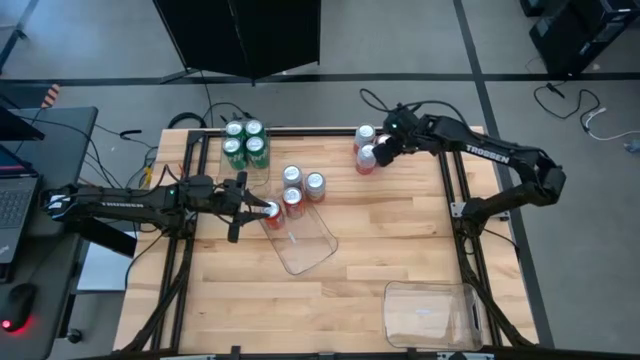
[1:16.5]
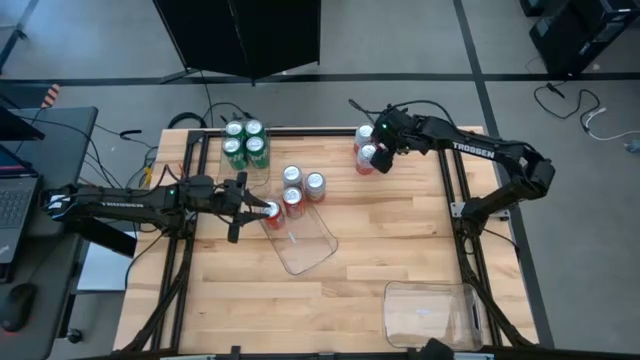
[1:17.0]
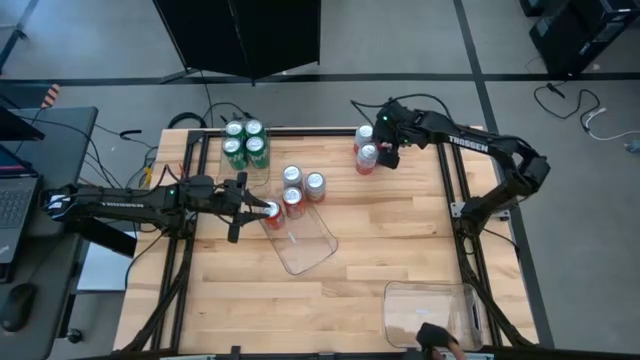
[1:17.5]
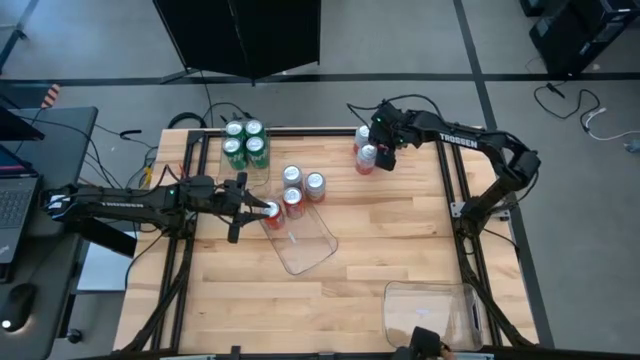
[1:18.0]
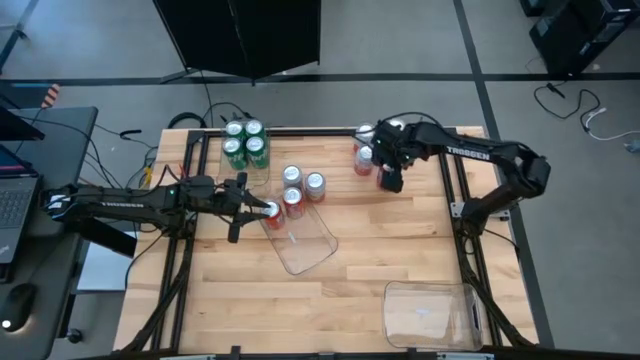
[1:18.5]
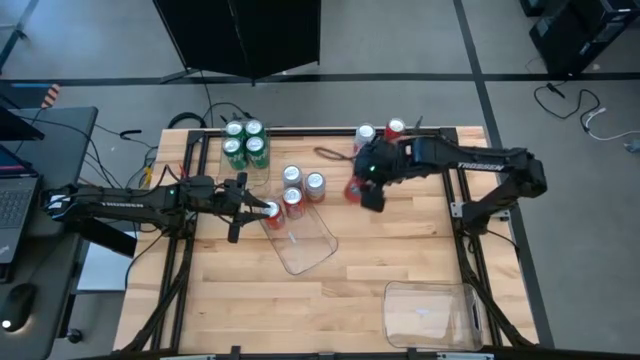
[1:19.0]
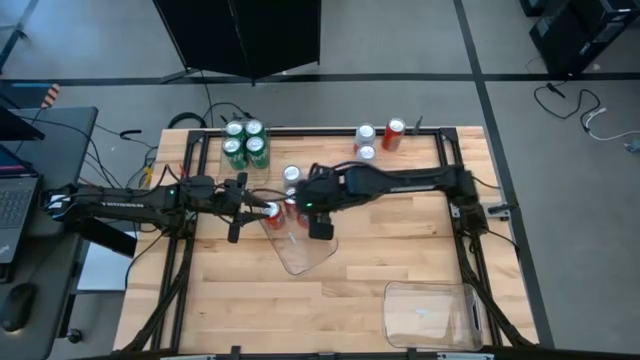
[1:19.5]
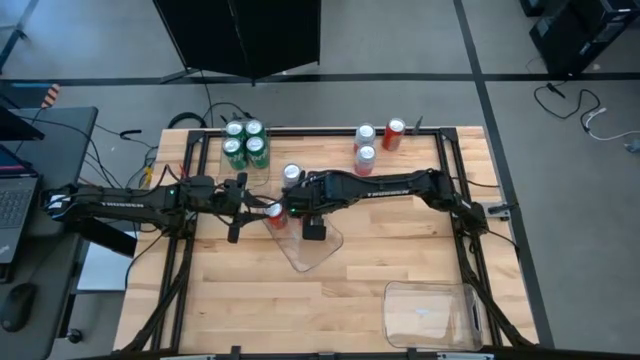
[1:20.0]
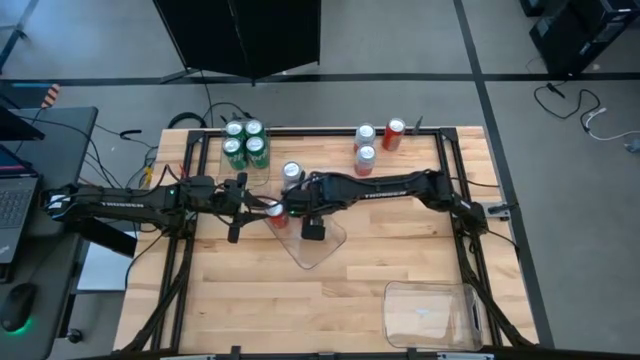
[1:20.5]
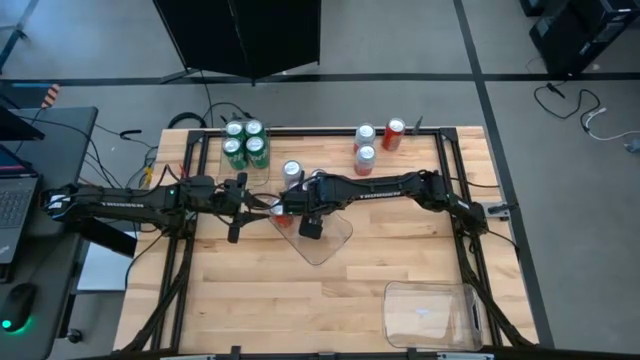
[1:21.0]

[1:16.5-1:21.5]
Task: Sort soda cans
Put the bottom orange soda can into the center transparent bin

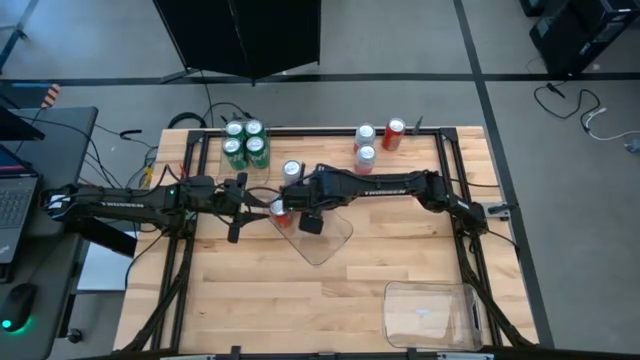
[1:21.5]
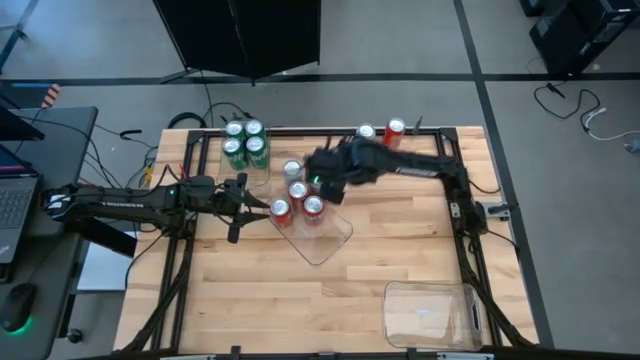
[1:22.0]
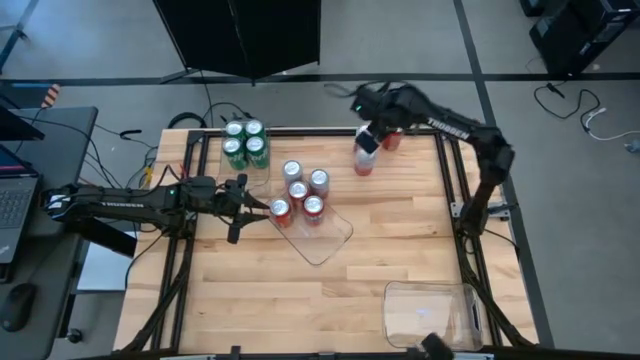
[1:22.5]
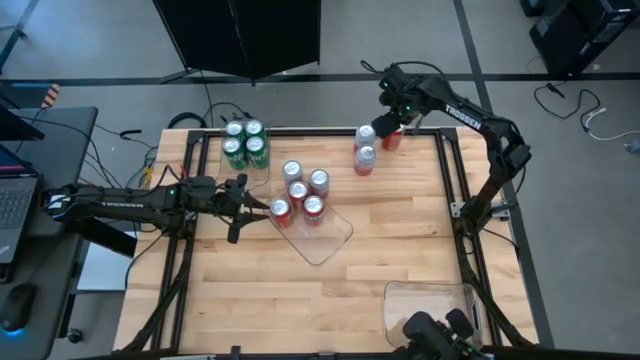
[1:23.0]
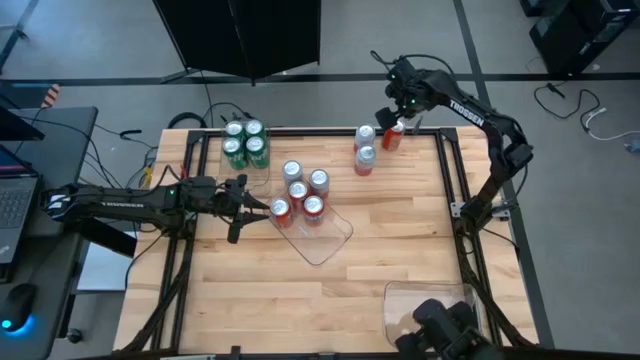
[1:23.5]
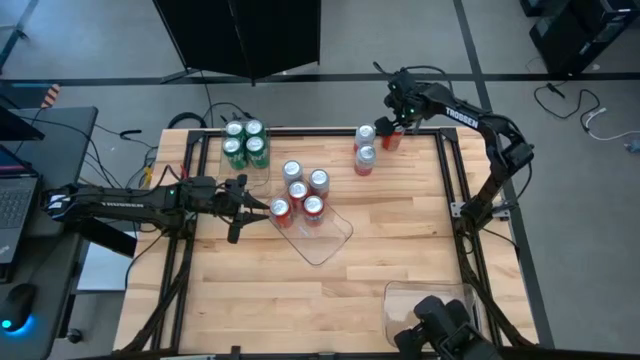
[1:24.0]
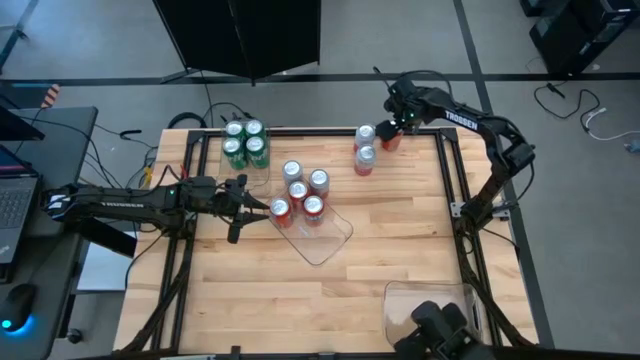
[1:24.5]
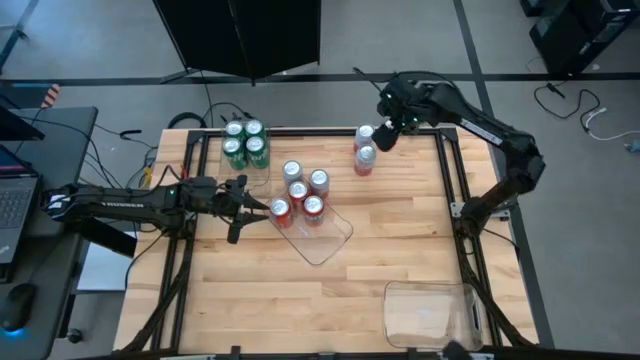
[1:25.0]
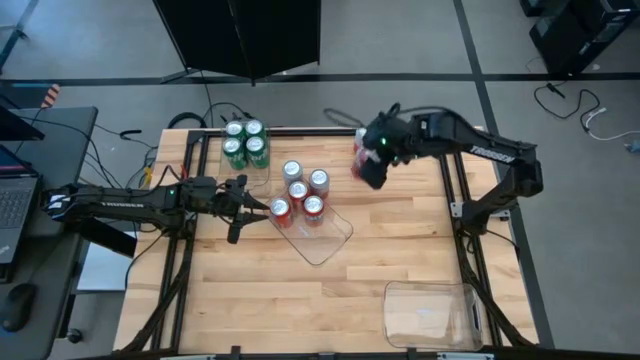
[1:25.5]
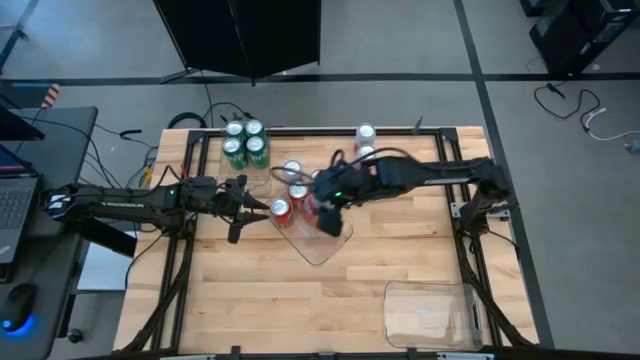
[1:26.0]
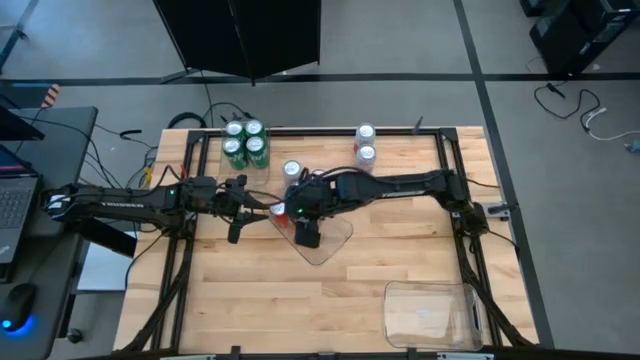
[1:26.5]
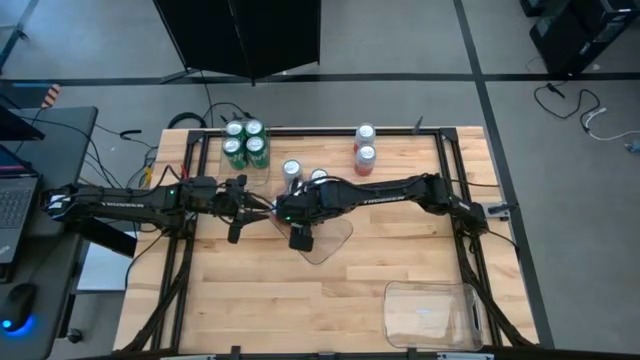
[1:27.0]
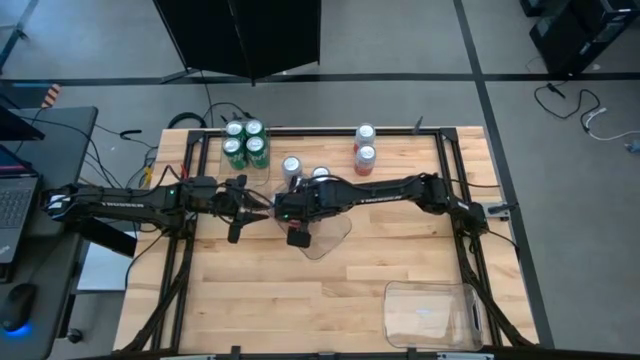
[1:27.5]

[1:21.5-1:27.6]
Put the orange soda can into the center transparent bin

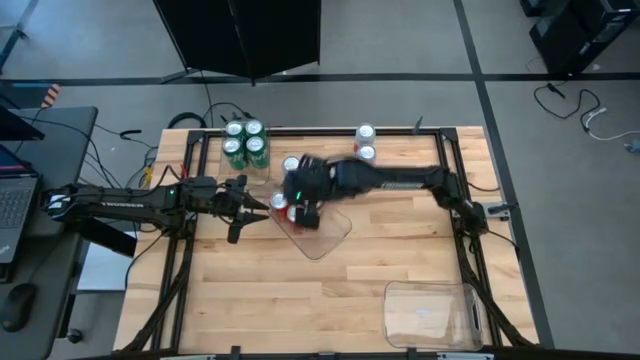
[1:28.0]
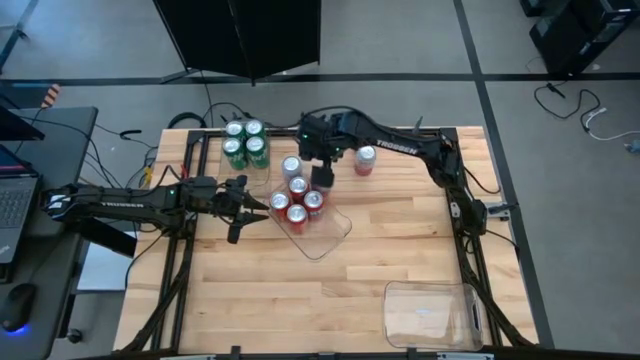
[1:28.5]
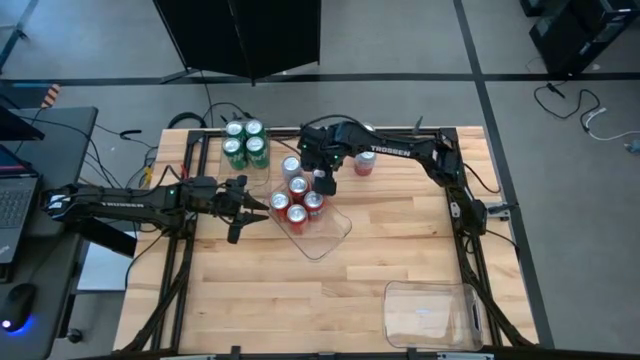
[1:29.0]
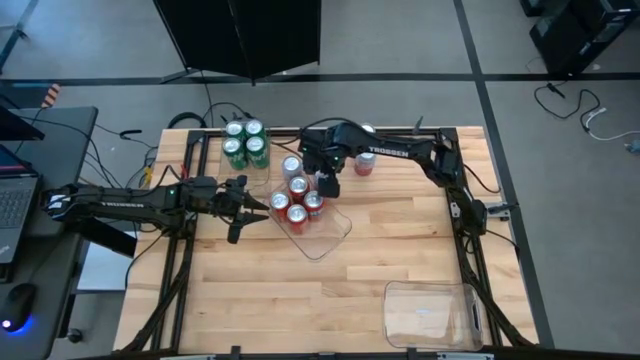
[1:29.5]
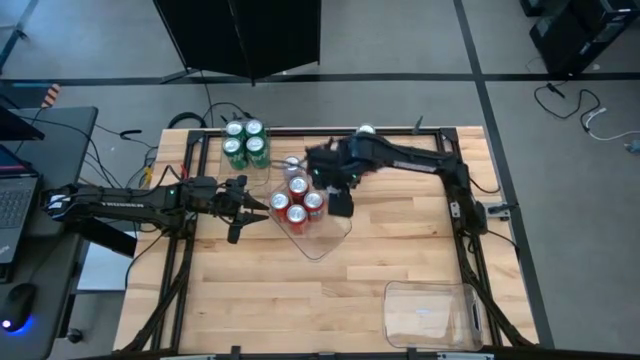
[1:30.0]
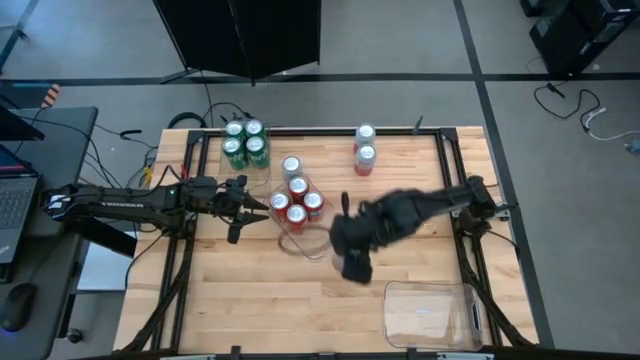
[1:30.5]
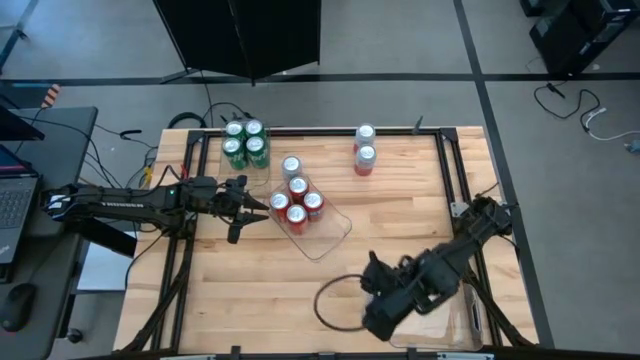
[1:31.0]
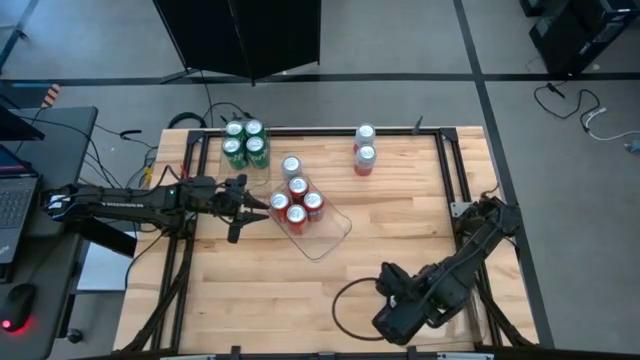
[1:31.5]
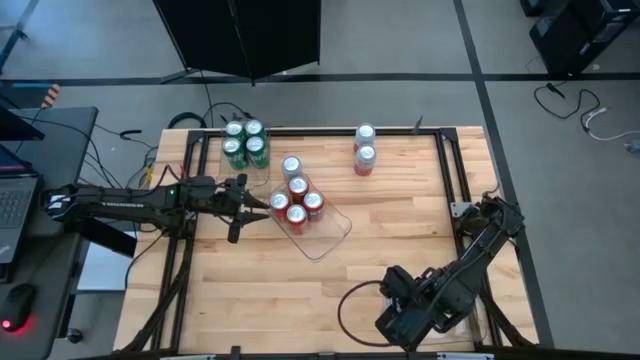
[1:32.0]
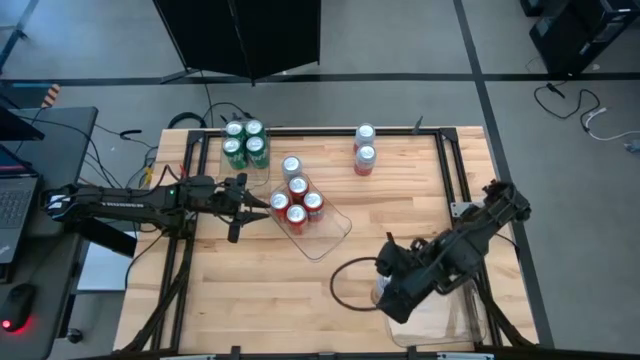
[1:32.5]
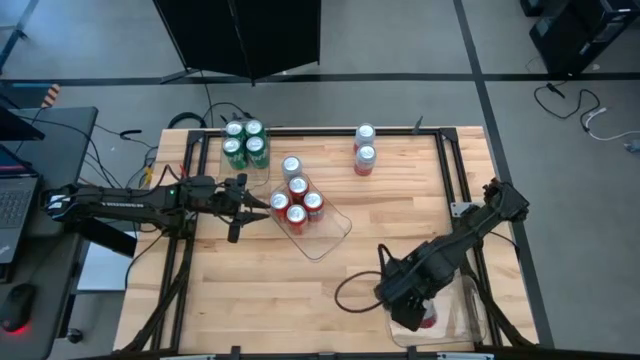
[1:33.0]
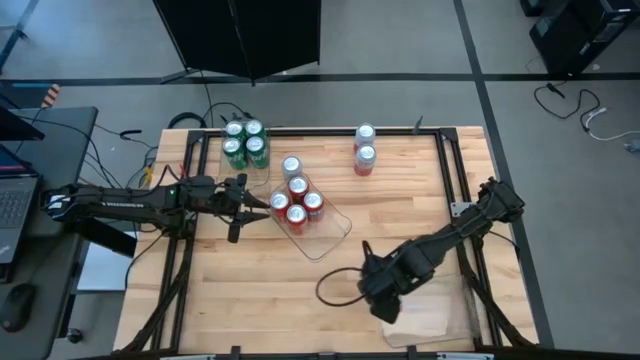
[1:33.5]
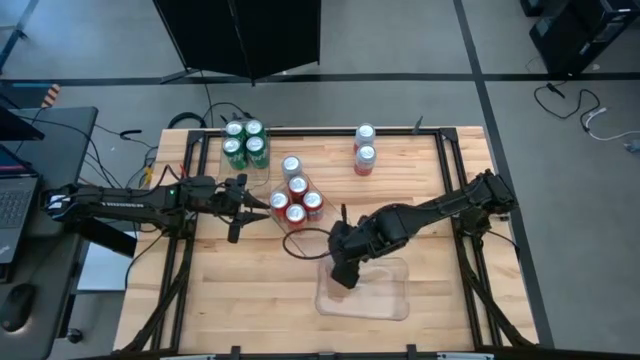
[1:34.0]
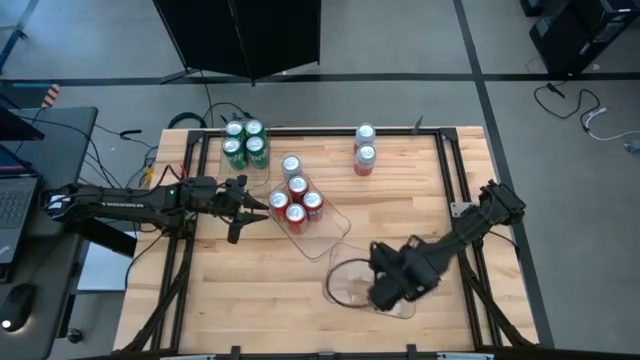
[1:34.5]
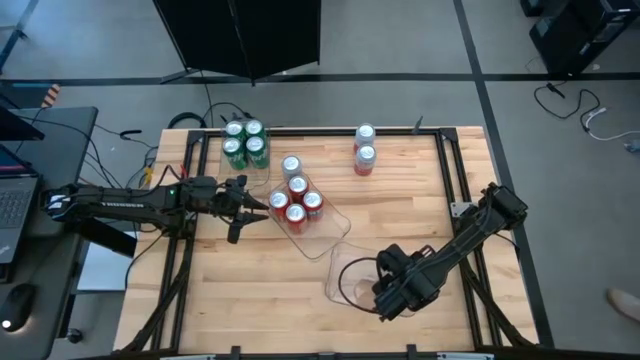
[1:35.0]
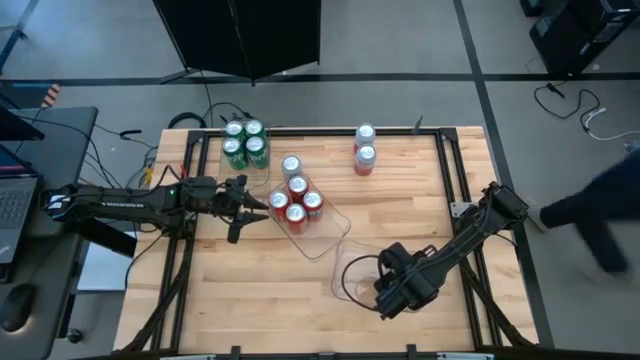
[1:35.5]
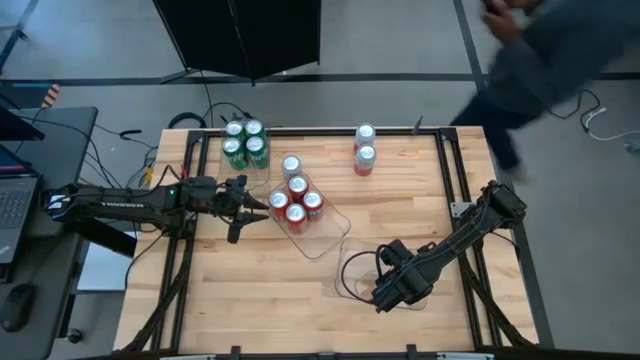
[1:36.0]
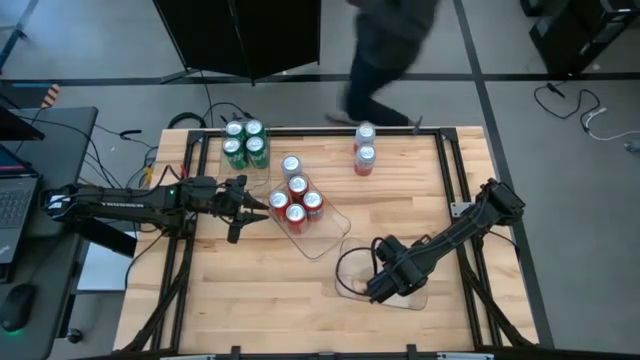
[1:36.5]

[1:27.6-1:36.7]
Put the bottom right pink and white soda can into the bottom right transparent bin
